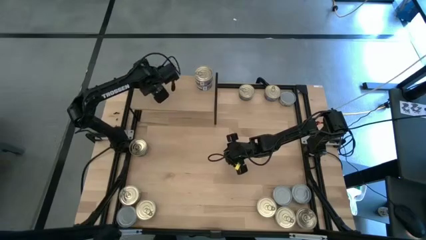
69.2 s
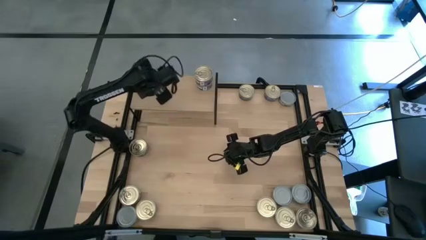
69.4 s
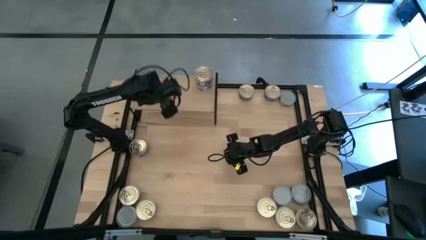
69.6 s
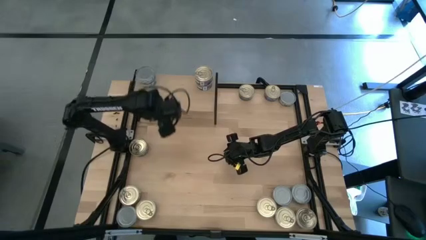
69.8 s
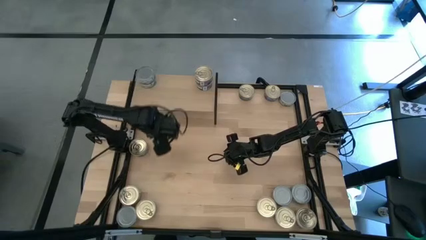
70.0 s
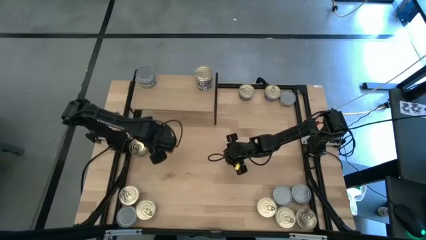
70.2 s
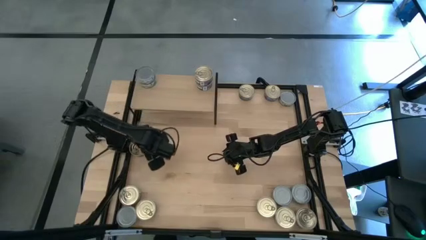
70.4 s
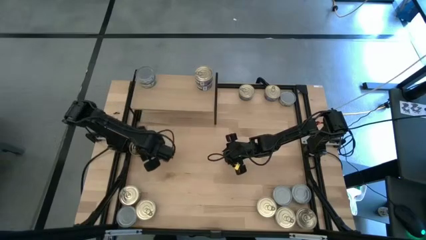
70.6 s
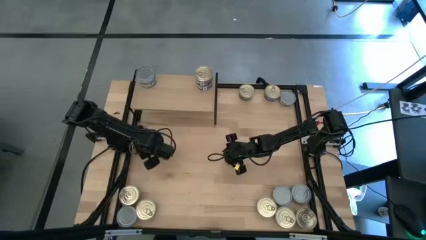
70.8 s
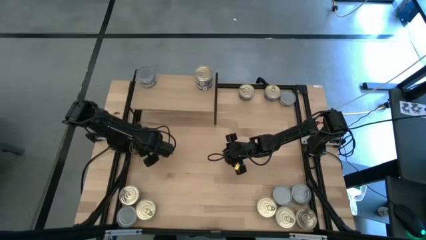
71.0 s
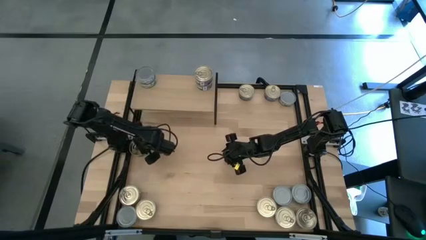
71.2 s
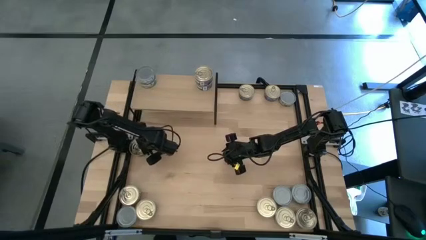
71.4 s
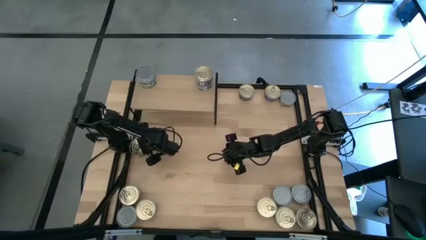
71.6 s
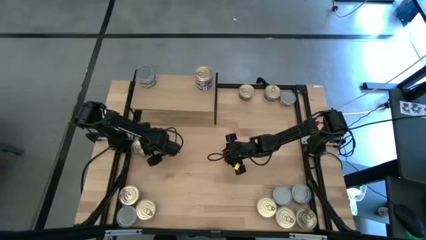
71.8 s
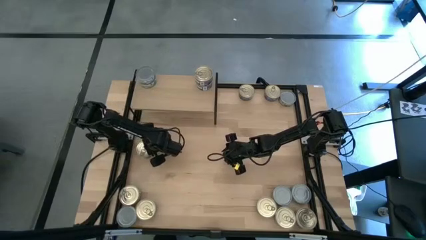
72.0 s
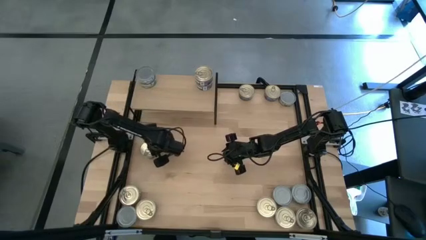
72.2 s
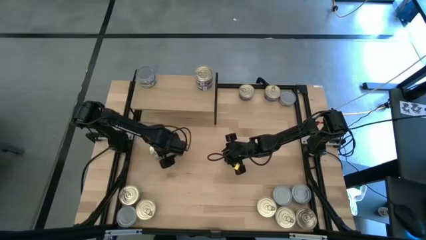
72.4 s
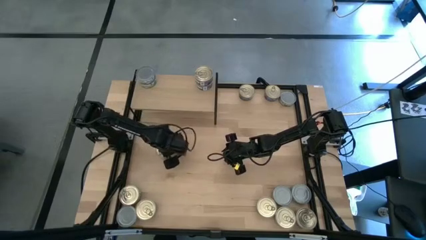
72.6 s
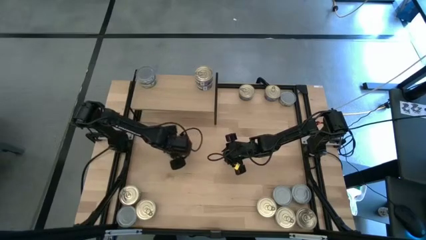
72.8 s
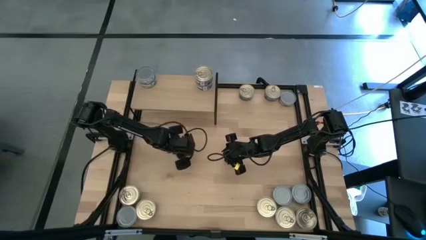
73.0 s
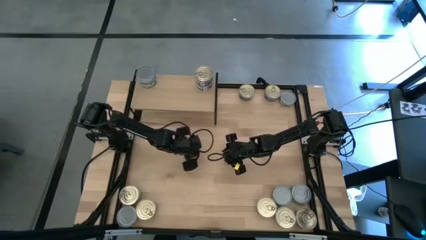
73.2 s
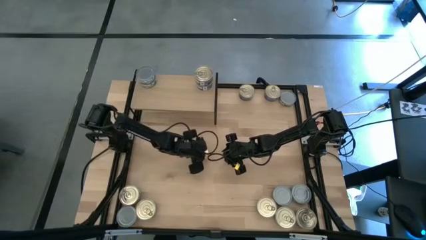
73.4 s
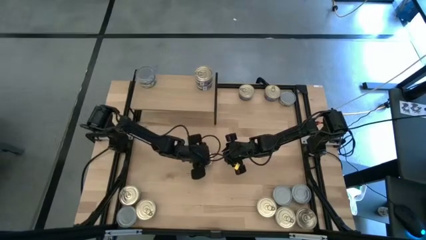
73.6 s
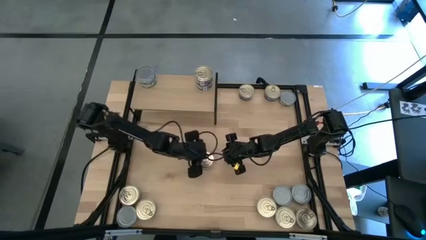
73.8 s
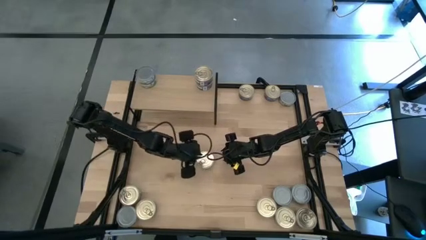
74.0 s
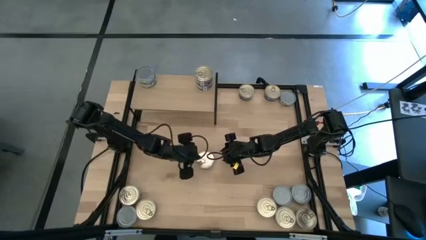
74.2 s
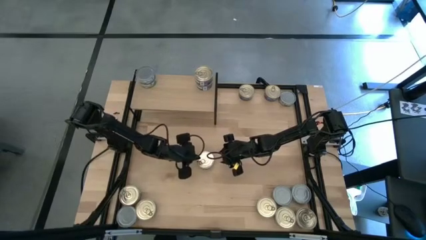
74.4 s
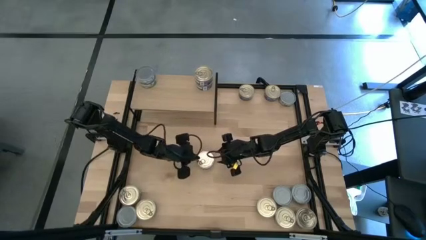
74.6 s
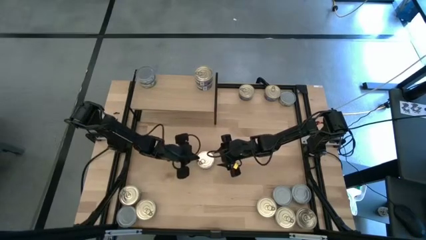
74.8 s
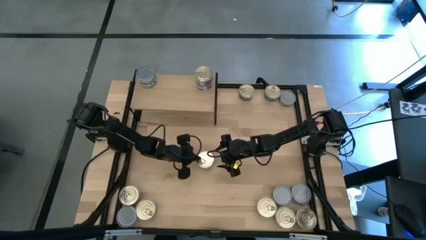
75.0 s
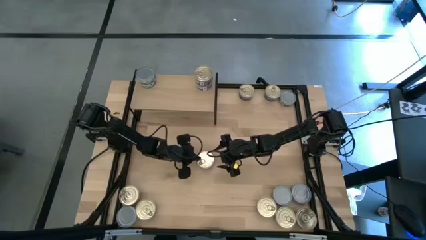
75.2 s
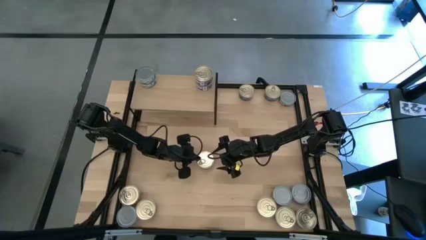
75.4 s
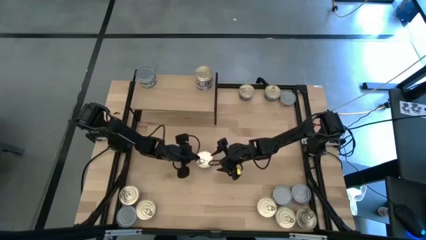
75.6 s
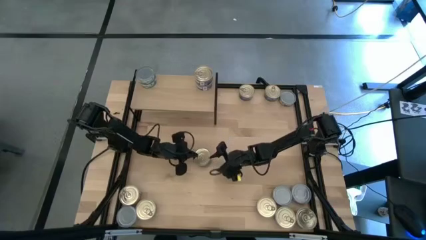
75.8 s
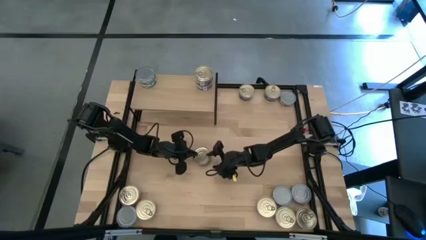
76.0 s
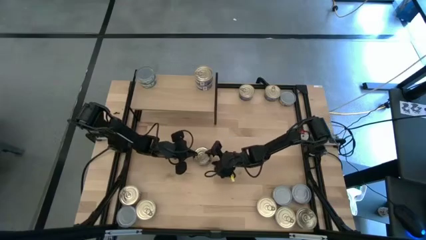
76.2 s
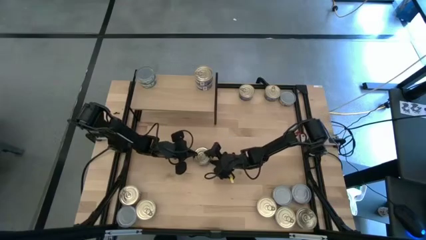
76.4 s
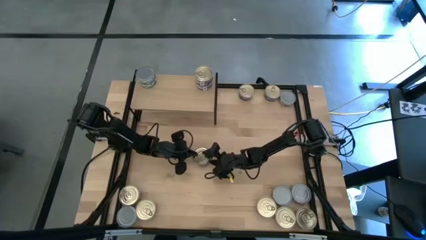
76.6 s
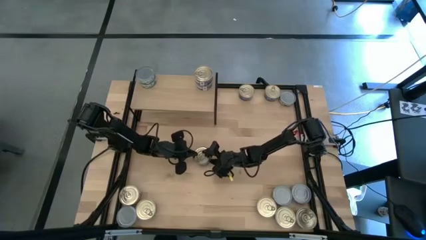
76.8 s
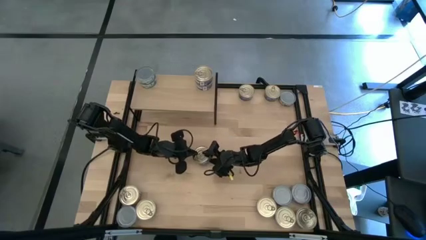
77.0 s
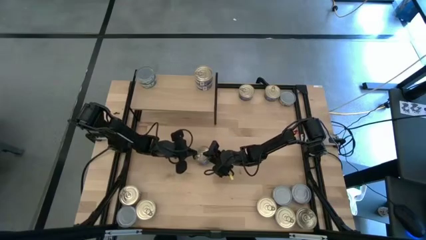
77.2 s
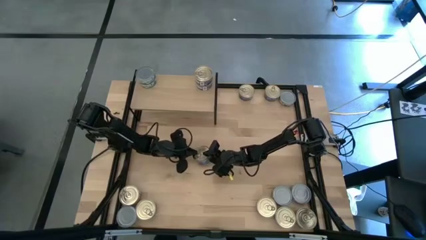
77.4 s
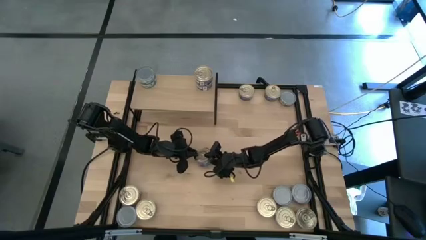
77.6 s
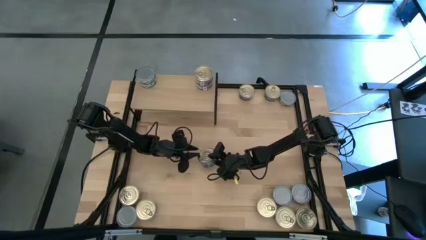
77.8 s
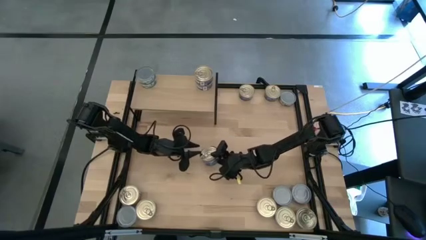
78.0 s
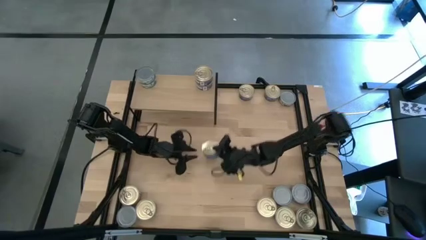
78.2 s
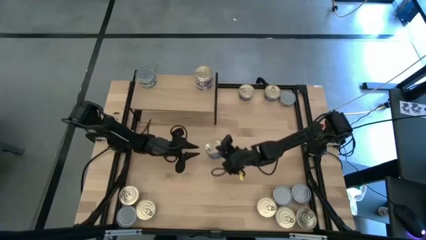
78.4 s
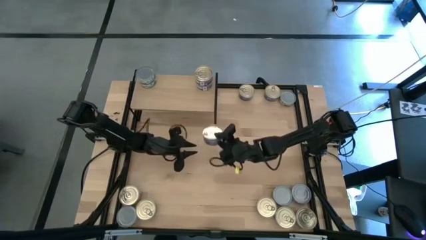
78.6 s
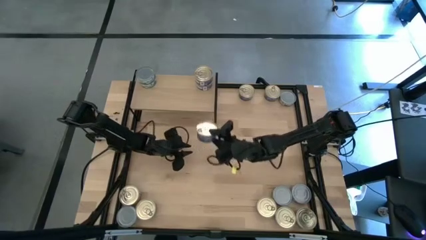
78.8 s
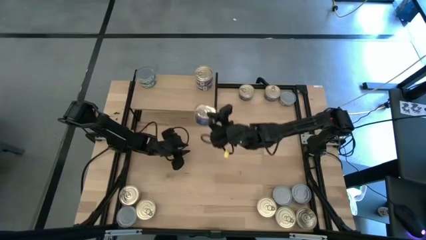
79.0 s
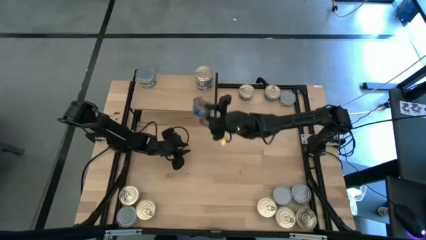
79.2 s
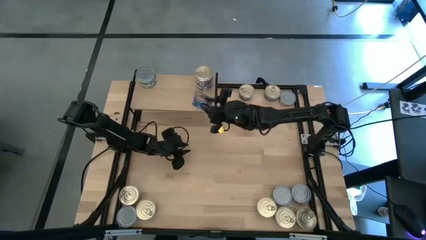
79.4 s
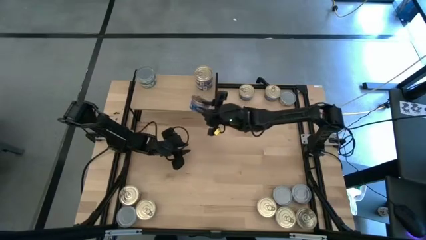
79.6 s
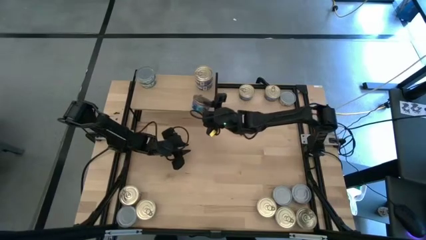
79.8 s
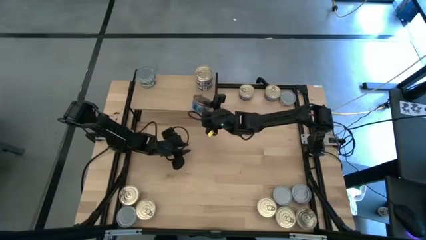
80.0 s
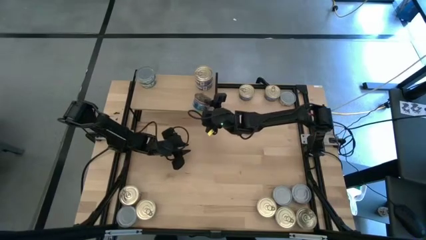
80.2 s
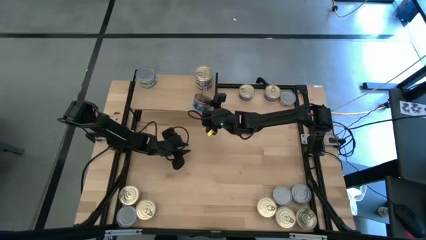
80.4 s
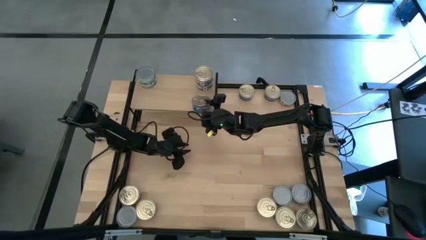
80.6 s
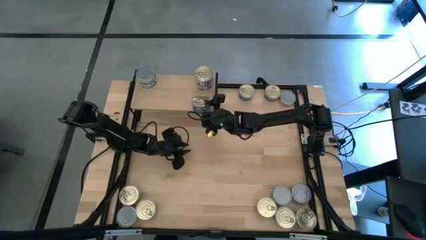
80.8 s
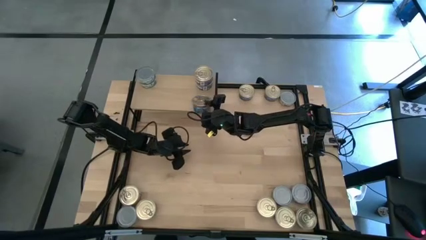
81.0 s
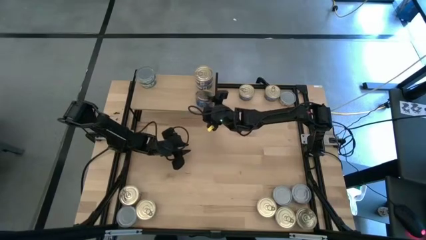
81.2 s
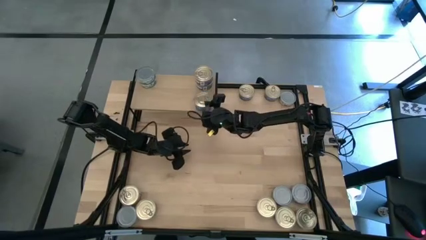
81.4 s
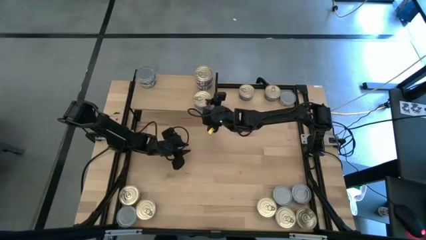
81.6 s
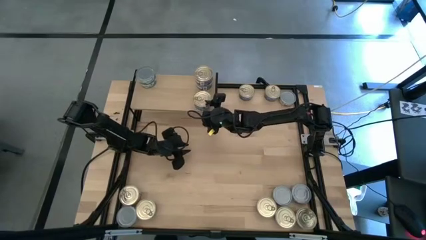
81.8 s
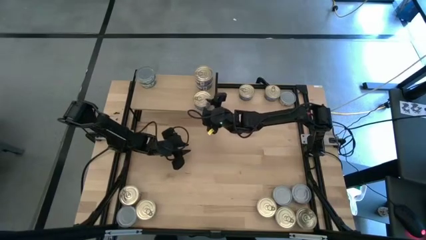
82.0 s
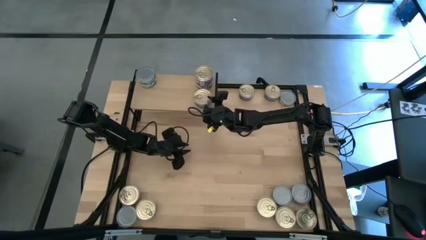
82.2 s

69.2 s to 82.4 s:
Task: Stack canned seafood by type on shelf
Put the blue tuna can on the shelf

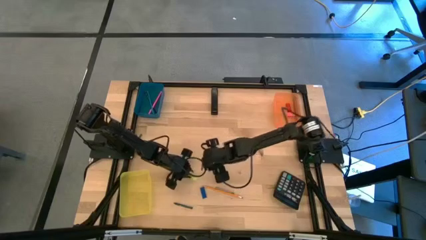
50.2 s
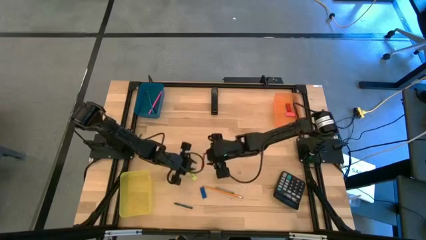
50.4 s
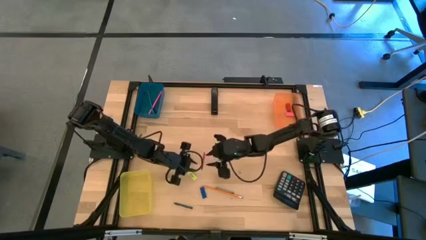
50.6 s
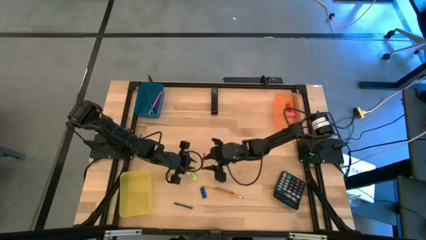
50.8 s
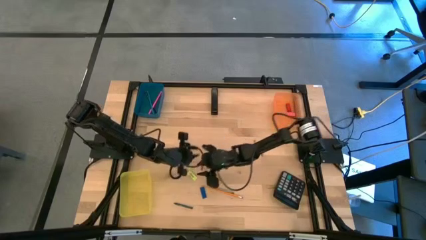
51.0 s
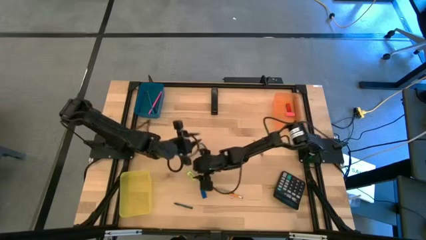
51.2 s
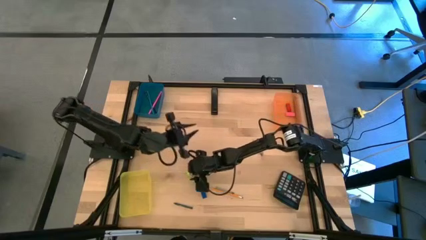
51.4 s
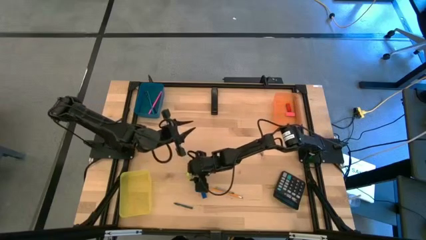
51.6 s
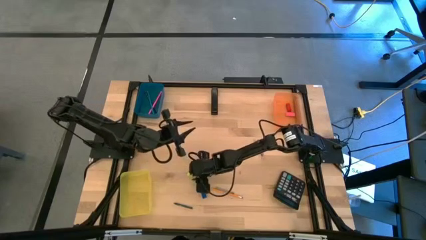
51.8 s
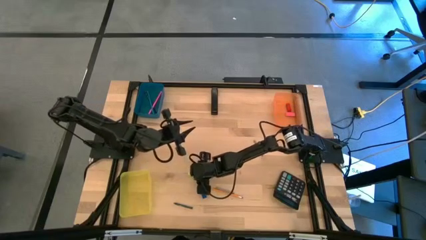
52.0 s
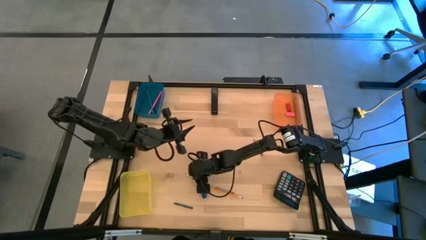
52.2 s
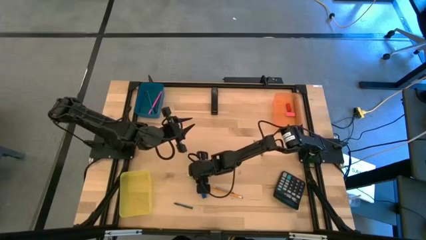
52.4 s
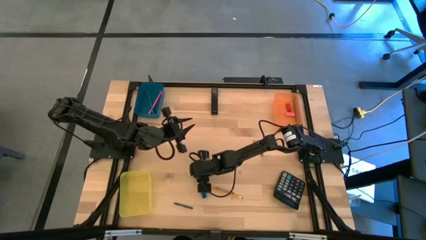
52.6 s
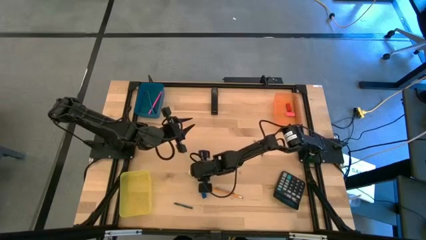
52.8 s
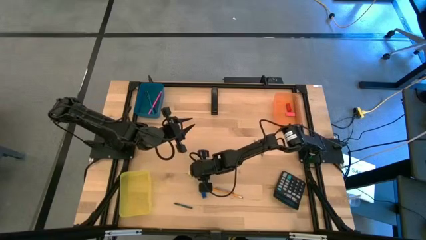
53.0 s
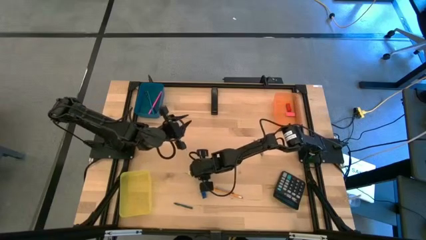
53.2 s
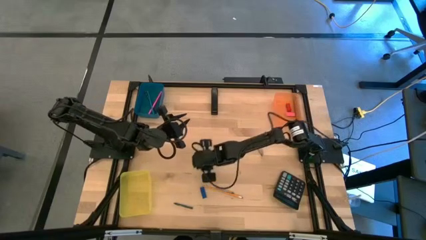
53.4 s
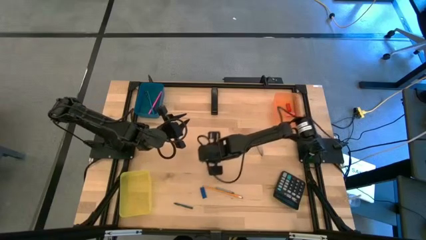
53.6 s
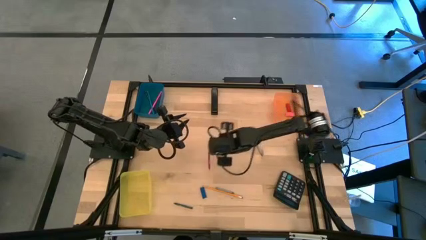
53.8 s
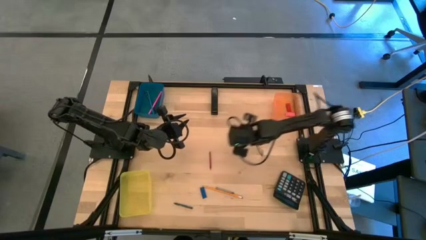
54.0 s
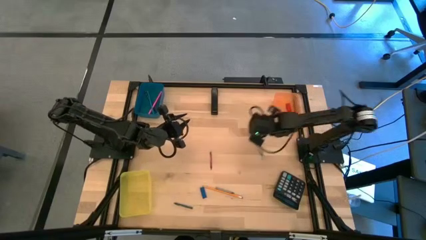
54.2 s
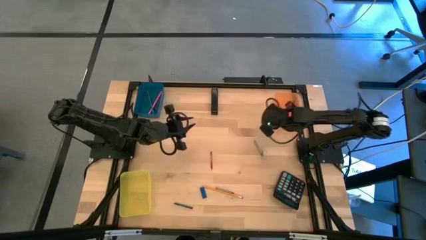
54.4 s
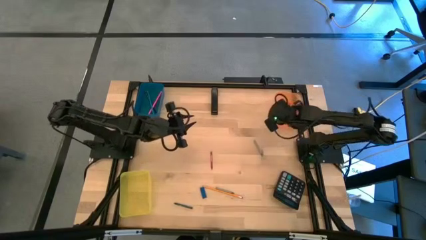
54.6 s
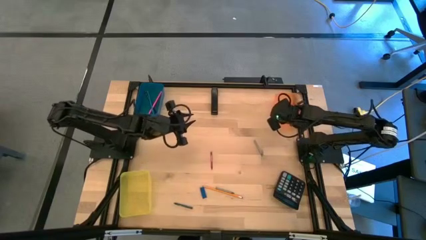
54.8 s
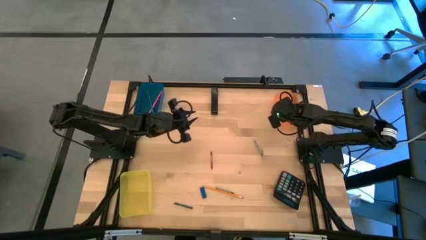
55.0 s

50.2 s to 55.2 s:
Task: Sort crayons/erasers/pens/pencils in bins
Put the yellow eraser into the orange bin
